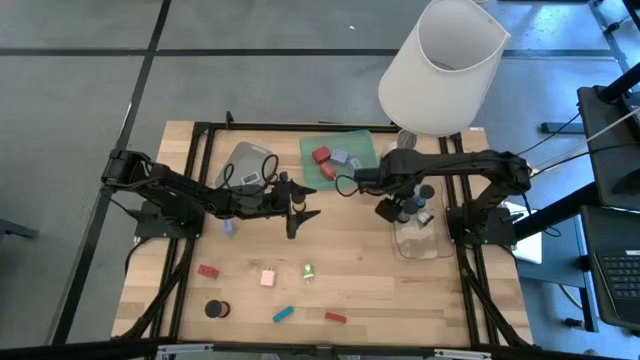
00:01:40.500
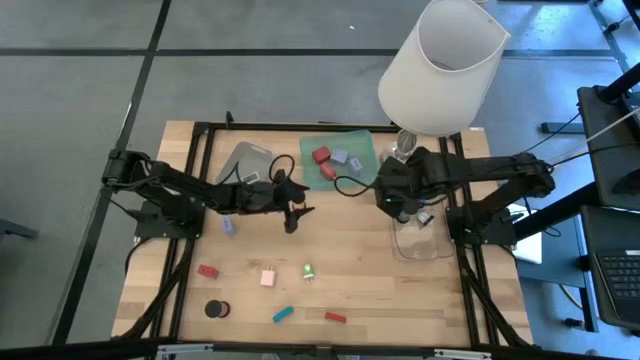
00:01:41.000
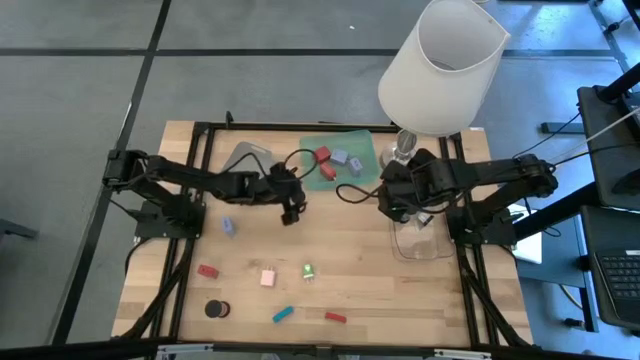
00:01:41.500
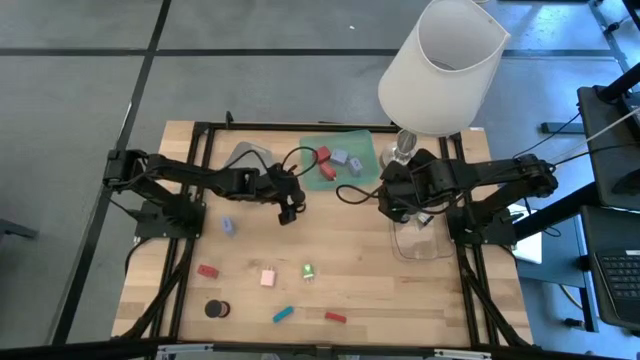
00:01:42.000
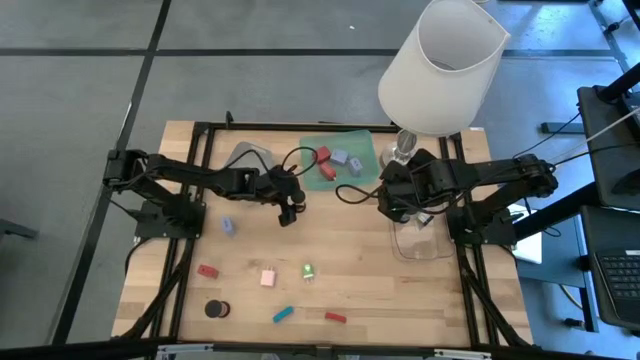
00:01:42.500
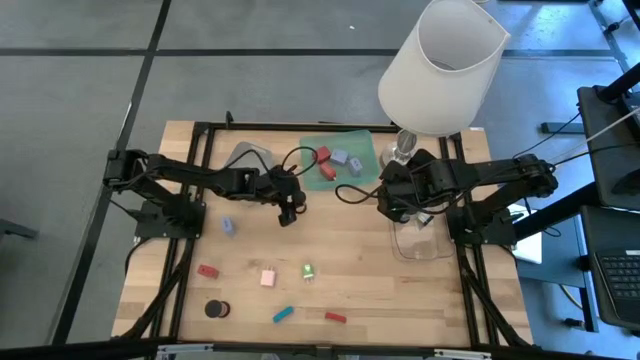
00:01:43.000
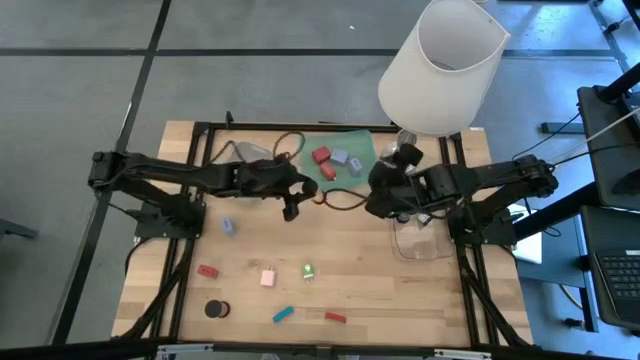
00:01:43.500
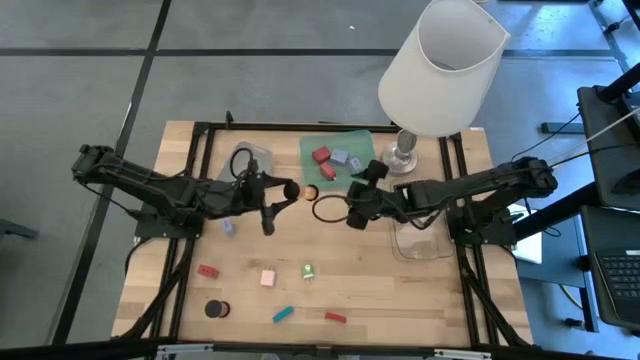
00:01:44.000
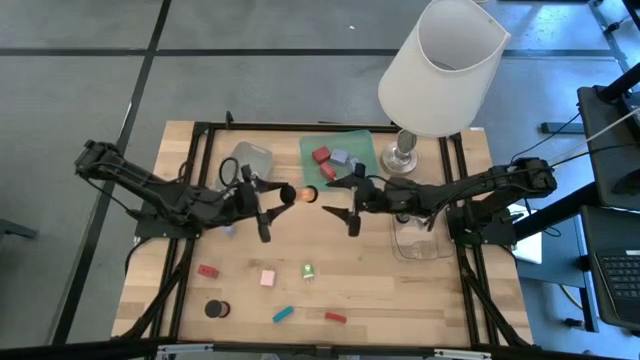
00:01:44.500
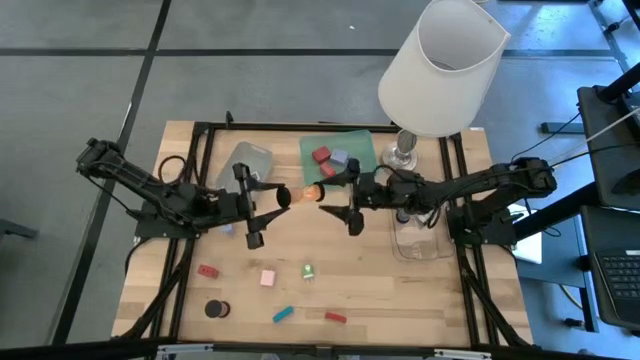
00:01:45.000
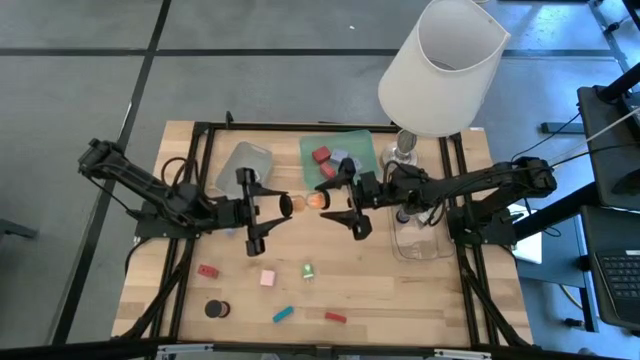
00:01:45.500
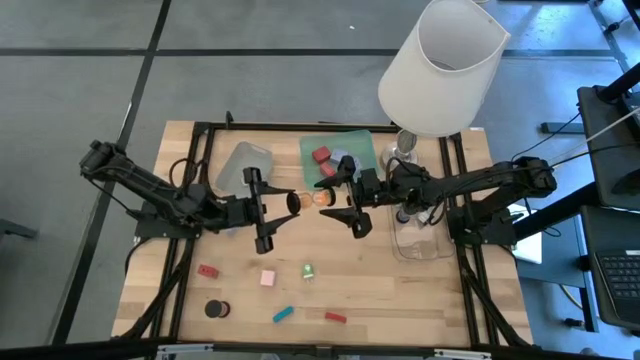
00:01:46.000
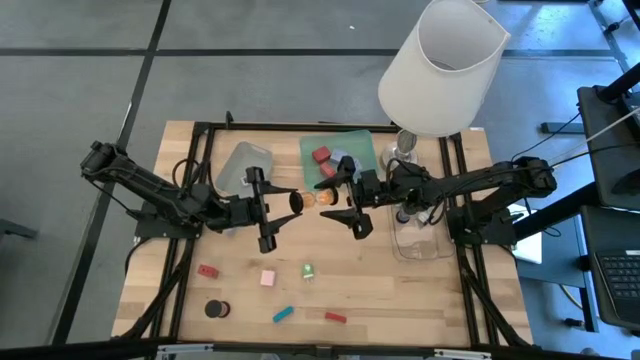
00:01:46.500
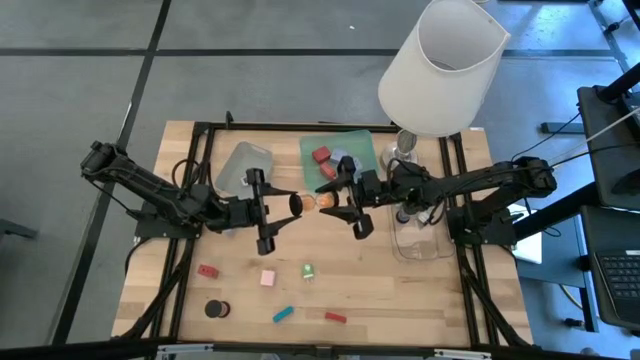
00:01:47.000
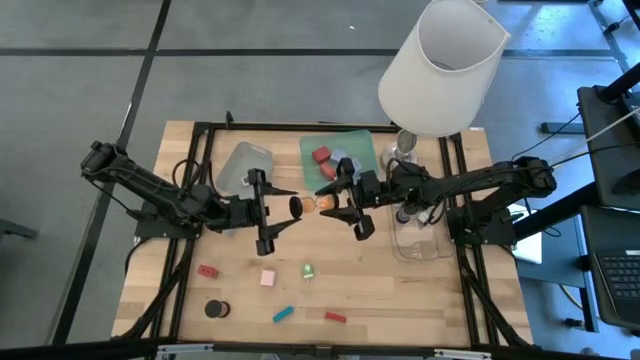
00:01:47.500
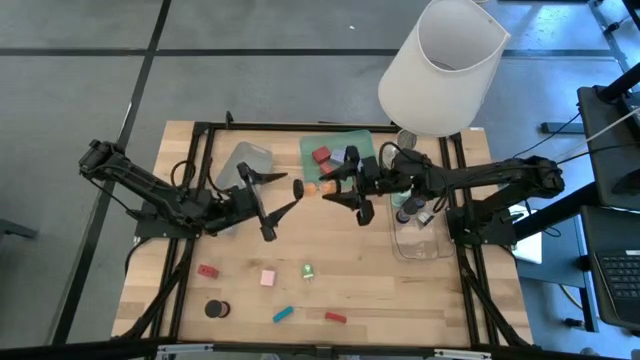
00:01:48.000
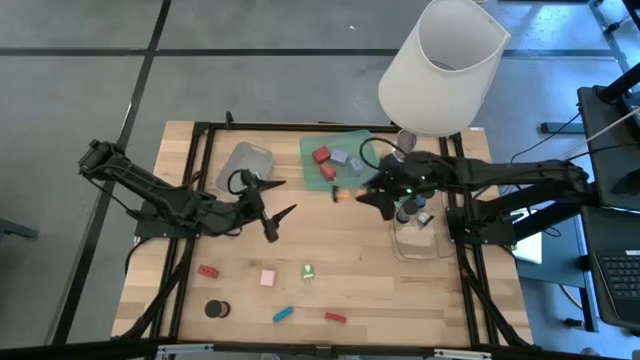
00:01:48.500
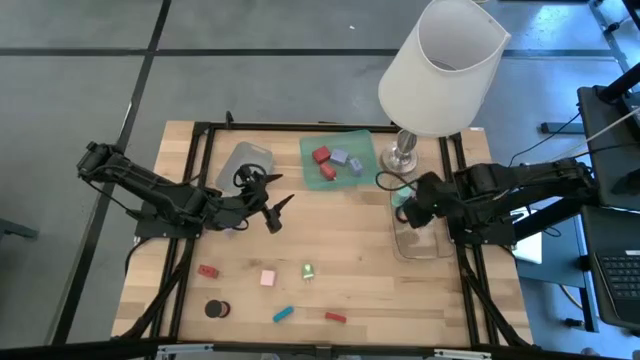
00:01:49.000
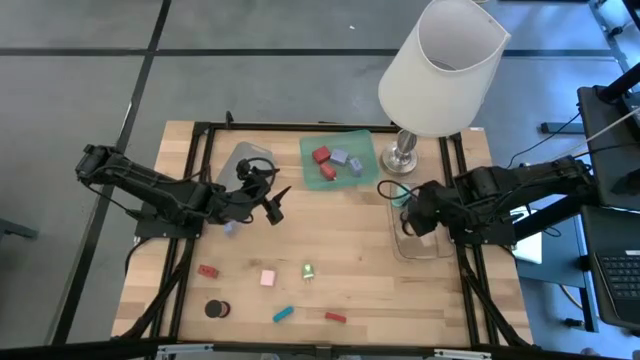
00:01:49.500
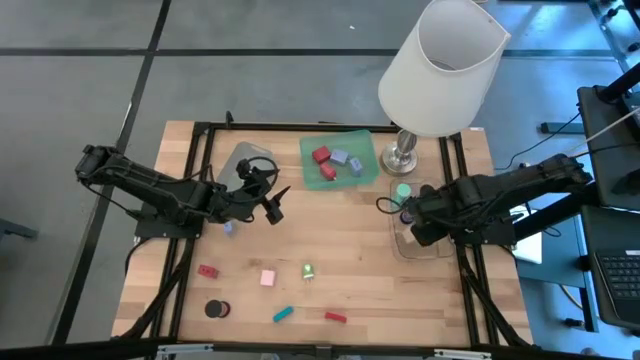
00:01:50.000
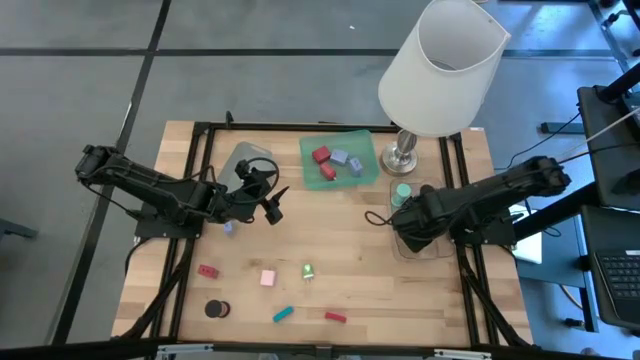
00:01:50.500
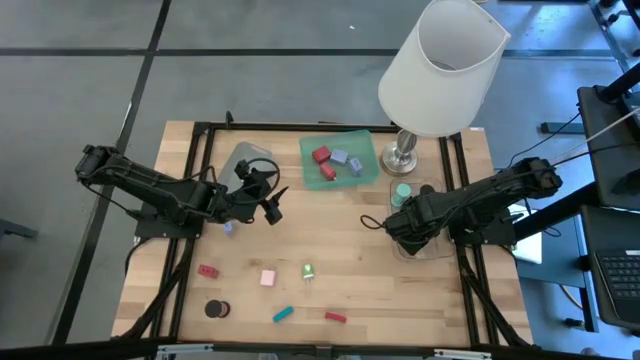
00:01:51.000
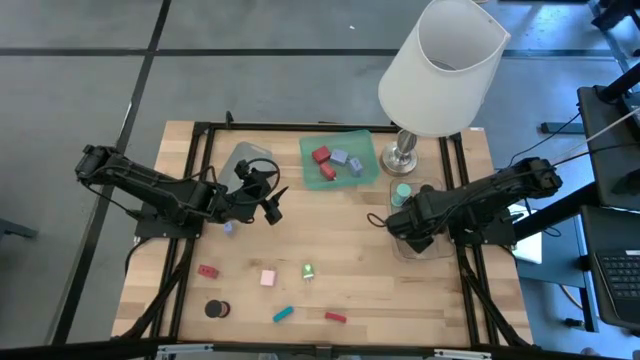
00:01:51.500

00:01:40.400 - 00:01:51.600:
Task: Pick & Place Office items
Put the orange hourglass into the transparent bin

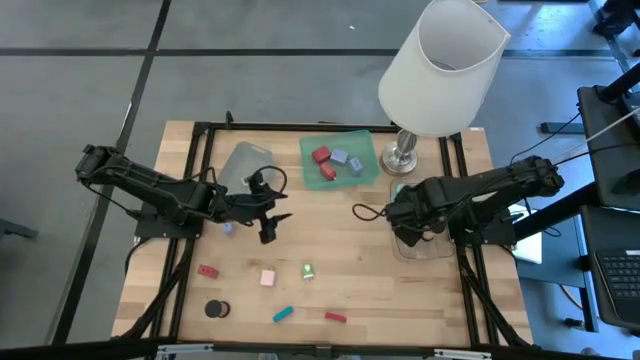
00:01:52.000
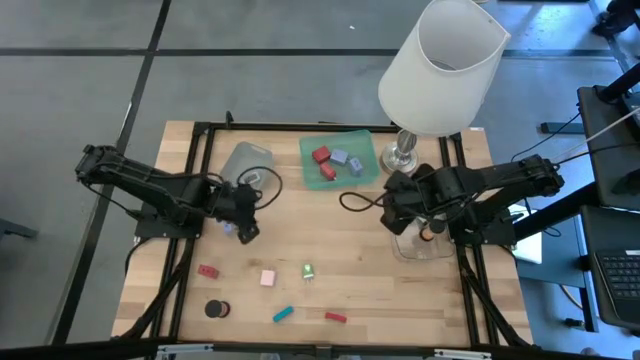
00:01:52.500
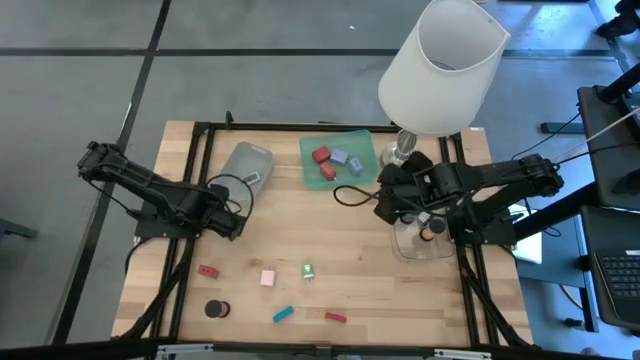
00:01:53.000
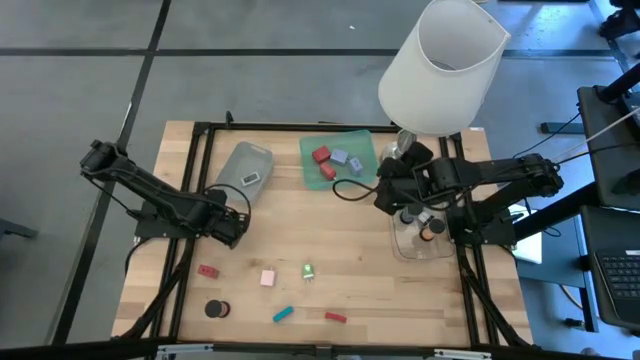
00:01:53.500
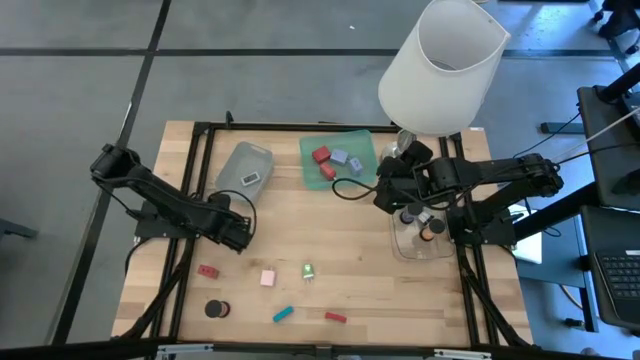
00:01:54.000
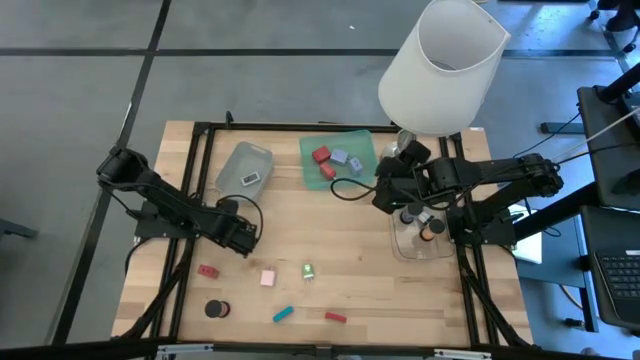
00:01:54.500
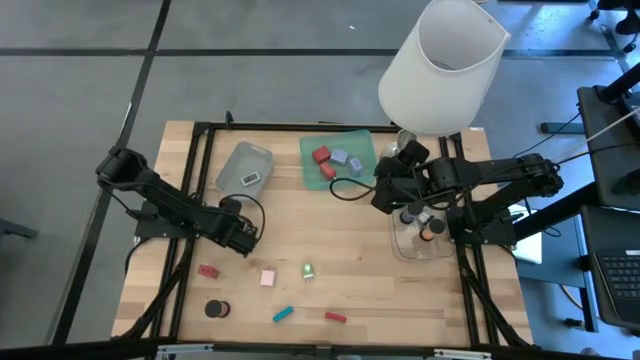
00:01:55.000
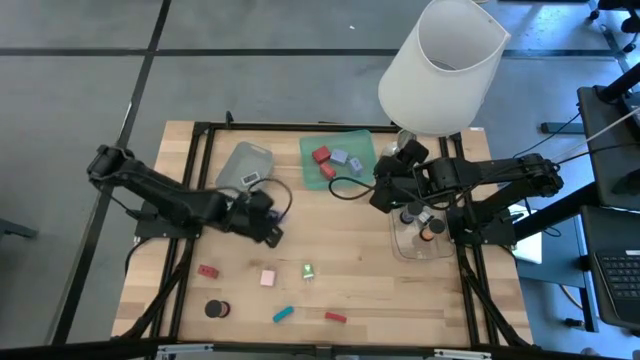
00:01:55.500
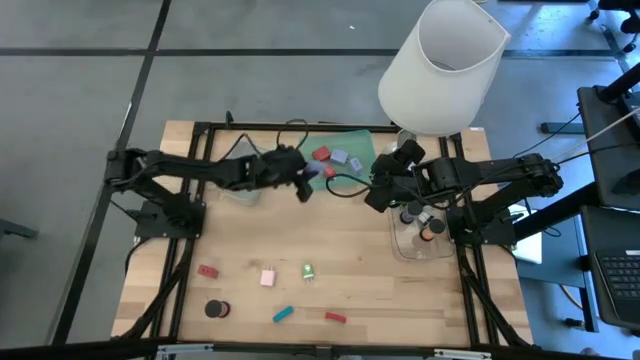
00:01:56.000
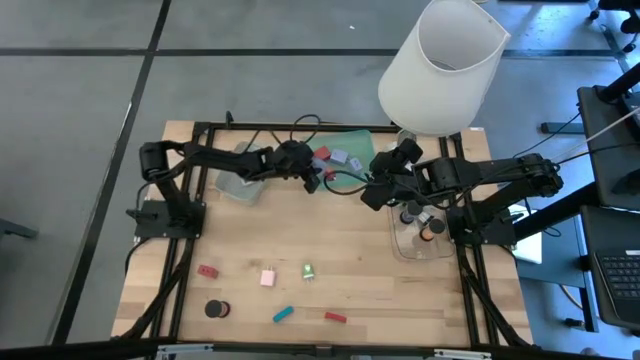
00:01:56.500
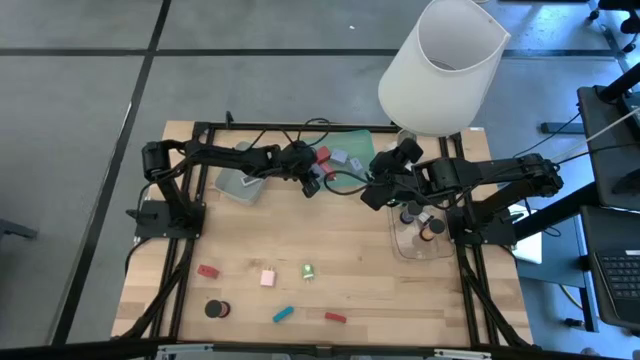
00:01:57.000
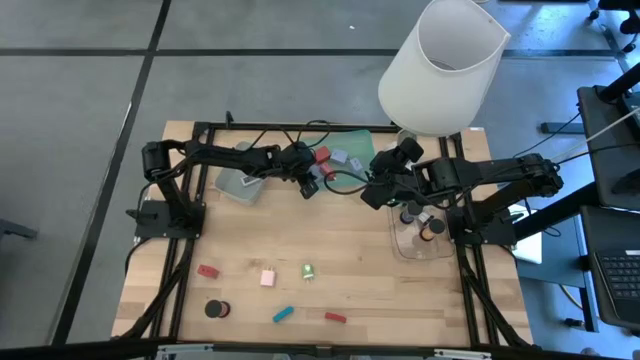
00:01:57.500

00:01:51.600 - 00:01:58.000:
Put the purple charger adapter into the green bin

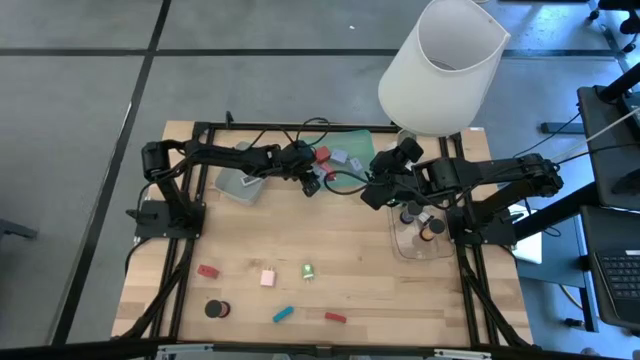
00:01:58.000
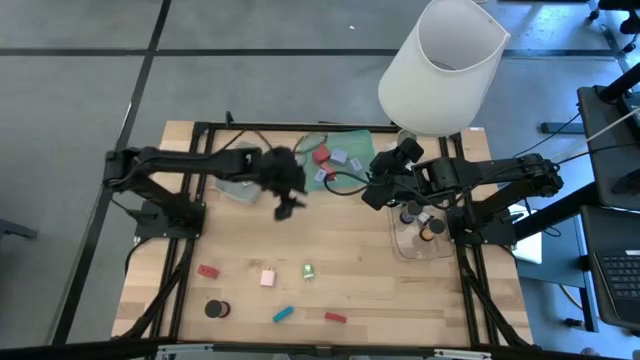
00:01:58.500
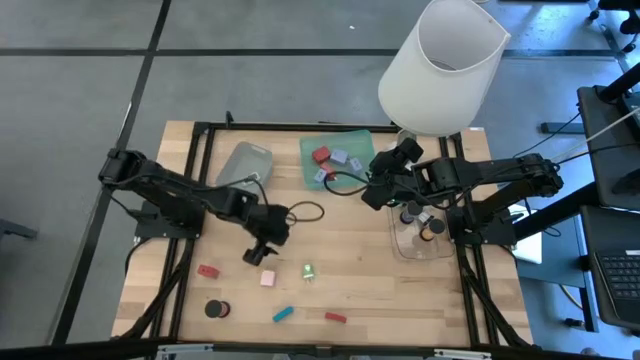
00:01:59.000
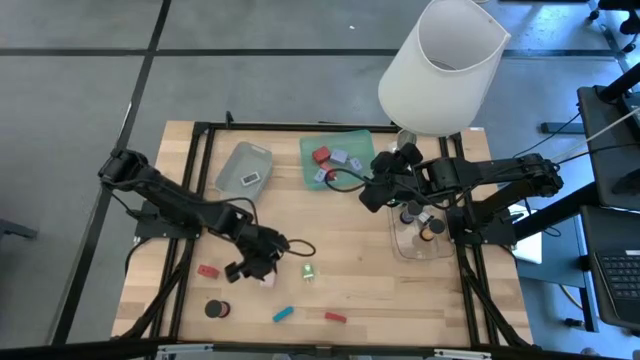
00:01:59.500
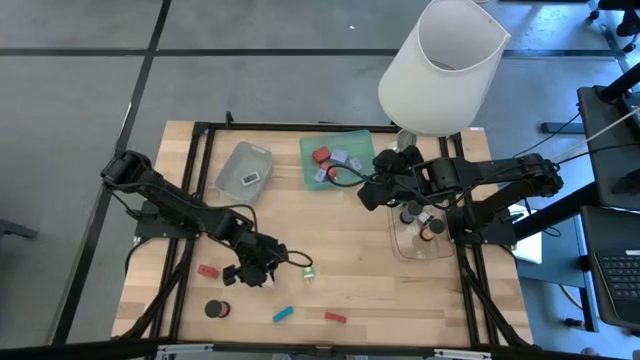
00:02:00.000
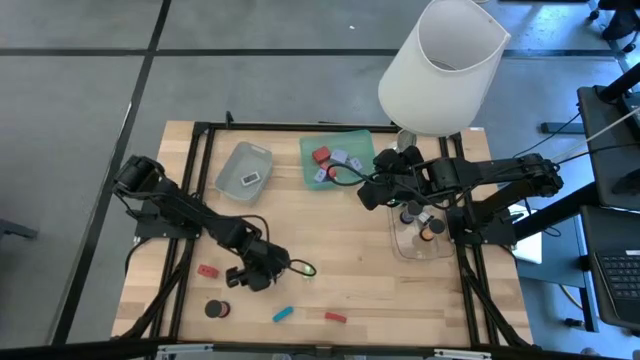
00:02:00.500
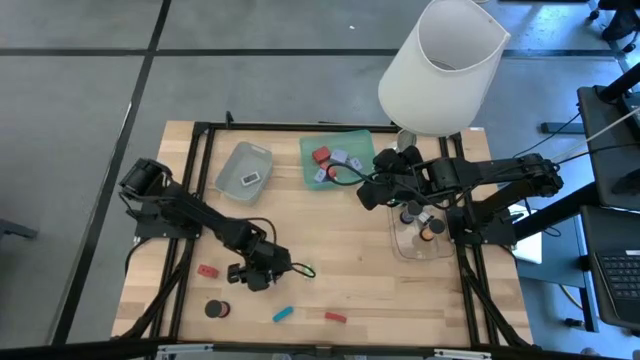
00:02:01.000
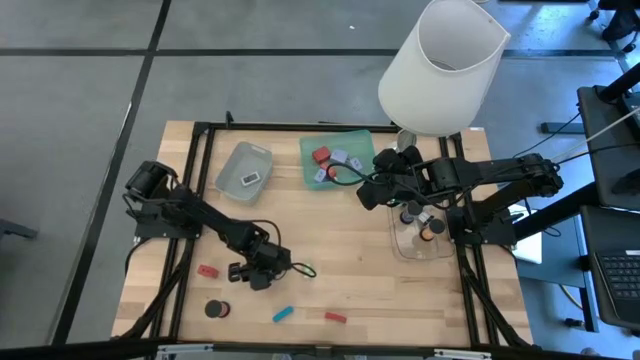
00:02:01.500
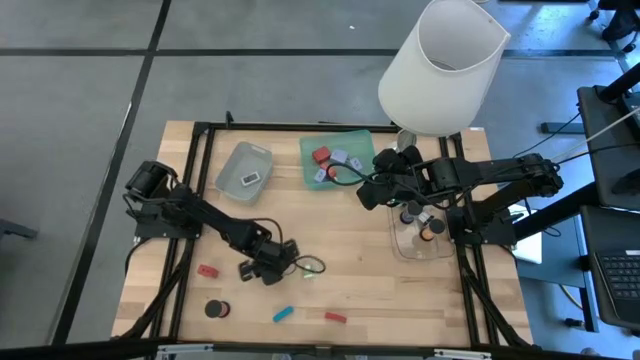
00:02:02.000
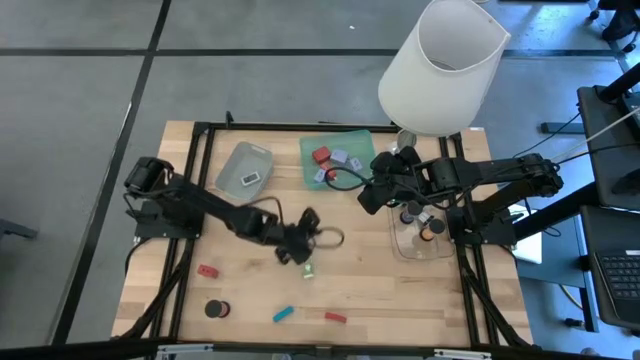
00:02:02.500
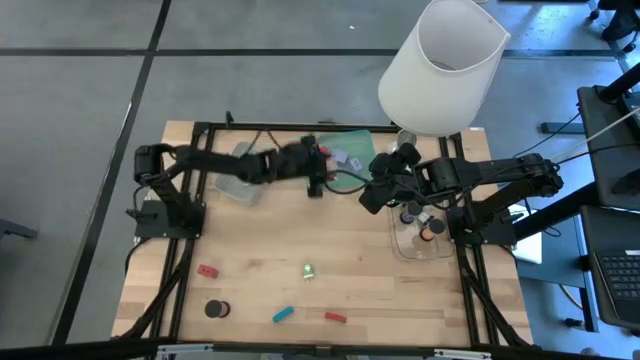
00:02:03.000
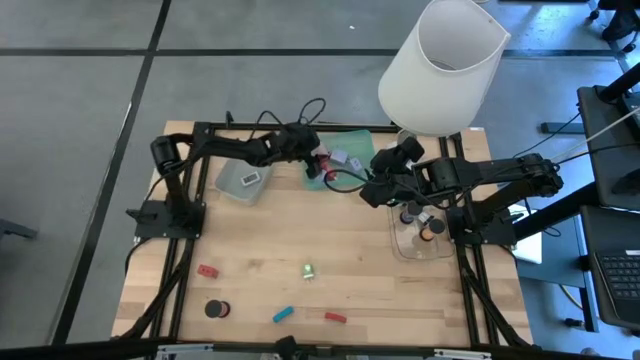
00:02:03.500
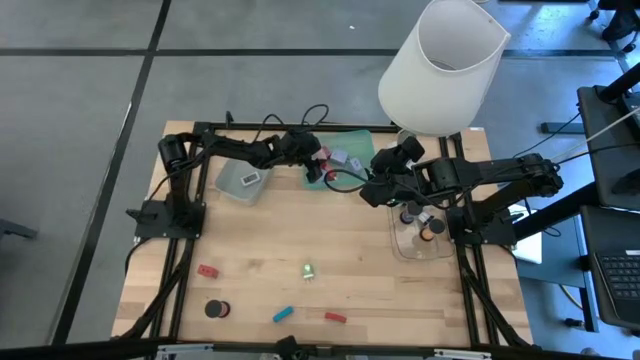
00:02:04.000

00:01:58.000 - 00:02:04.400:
Put the white charger adapter into the green bin
